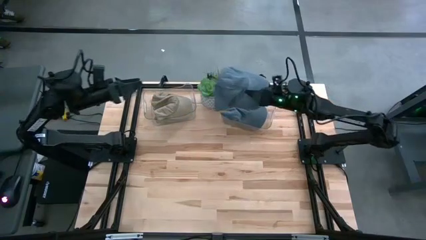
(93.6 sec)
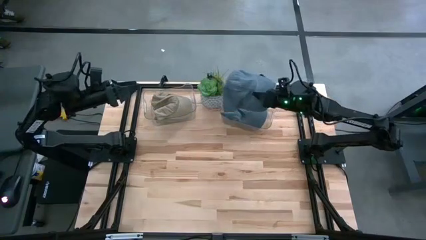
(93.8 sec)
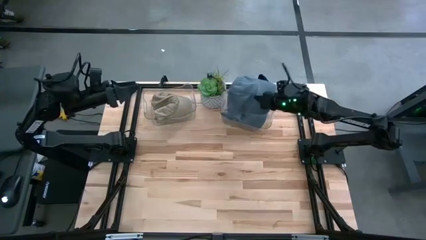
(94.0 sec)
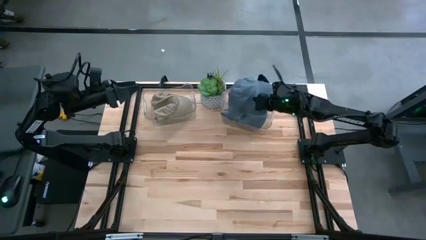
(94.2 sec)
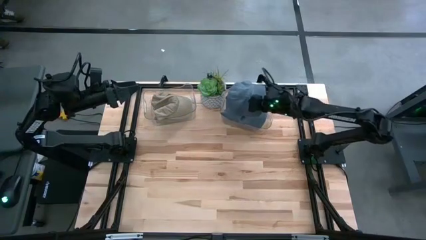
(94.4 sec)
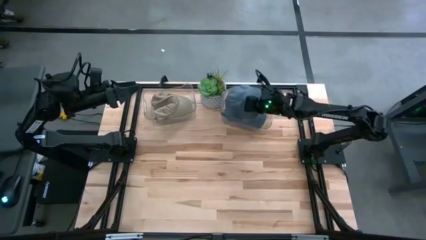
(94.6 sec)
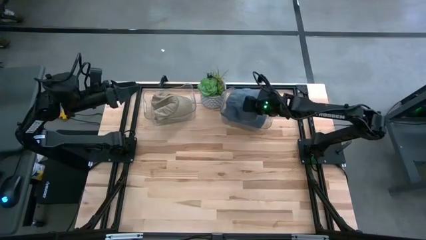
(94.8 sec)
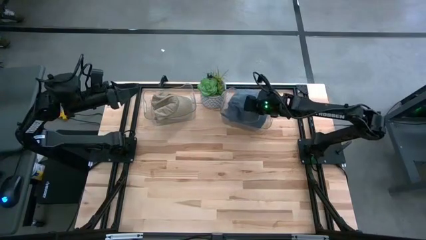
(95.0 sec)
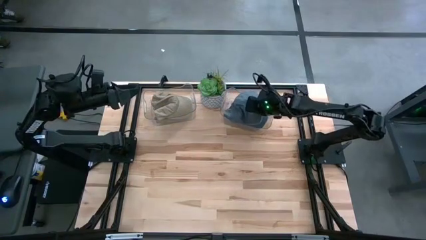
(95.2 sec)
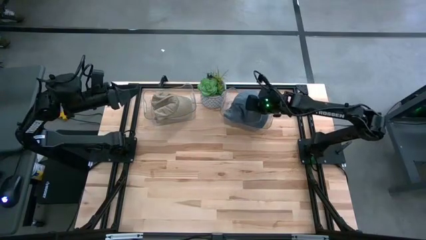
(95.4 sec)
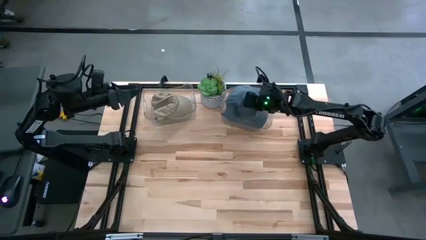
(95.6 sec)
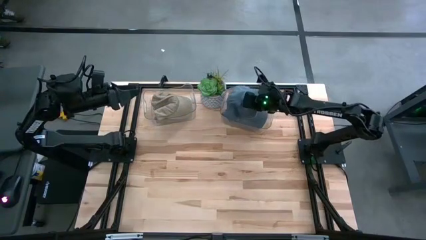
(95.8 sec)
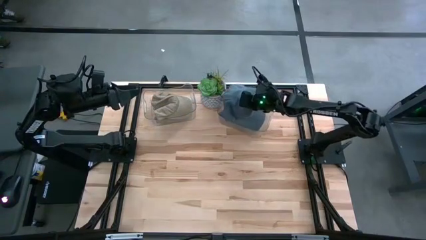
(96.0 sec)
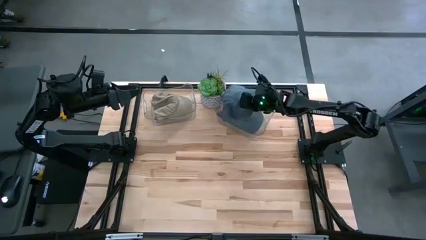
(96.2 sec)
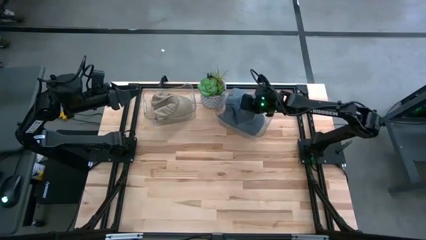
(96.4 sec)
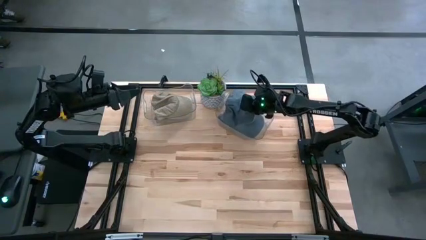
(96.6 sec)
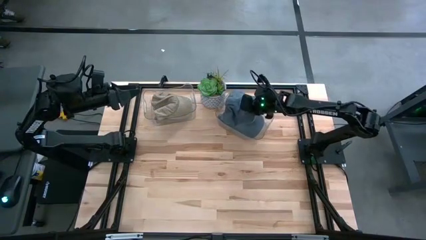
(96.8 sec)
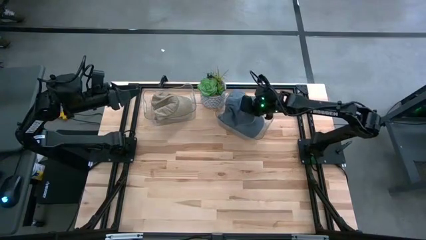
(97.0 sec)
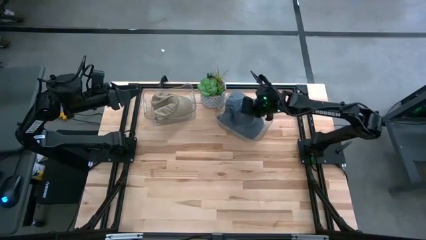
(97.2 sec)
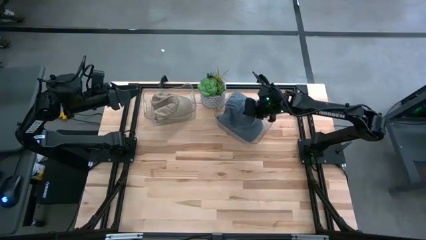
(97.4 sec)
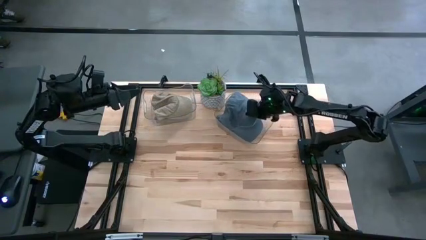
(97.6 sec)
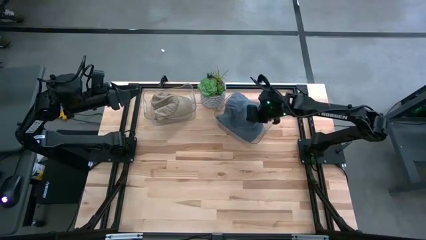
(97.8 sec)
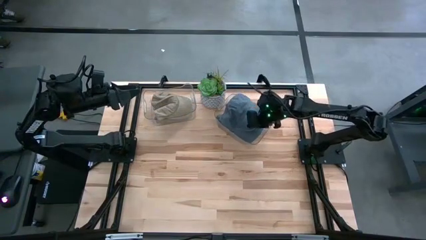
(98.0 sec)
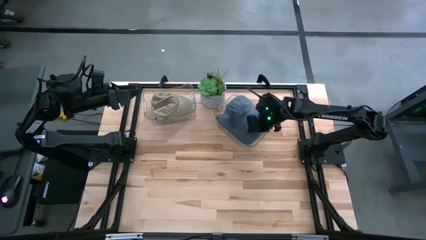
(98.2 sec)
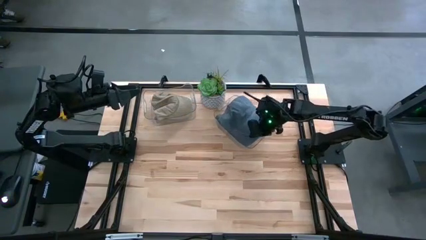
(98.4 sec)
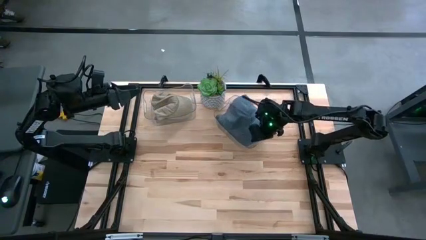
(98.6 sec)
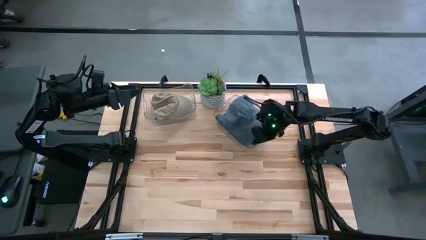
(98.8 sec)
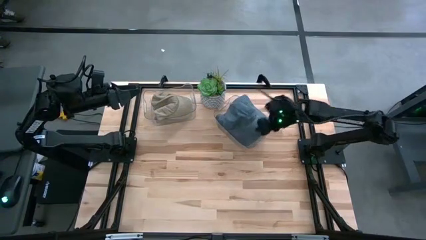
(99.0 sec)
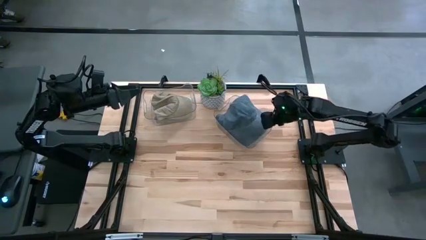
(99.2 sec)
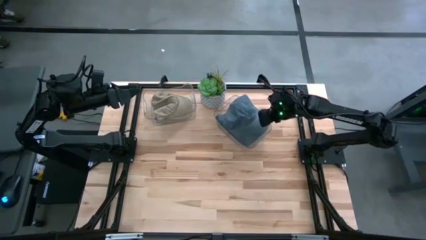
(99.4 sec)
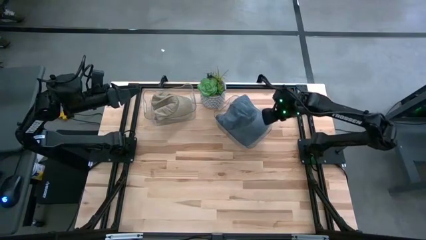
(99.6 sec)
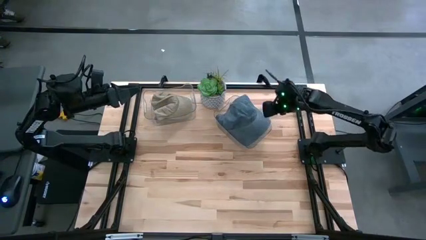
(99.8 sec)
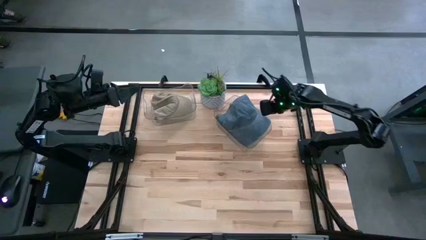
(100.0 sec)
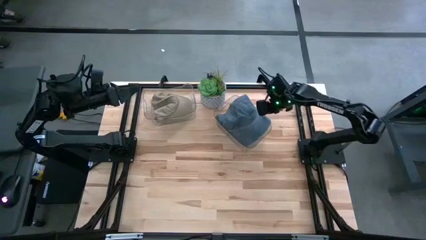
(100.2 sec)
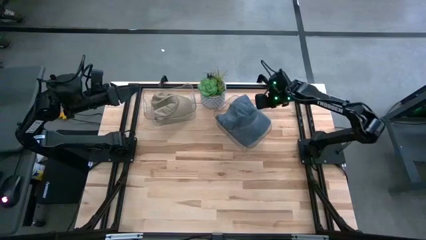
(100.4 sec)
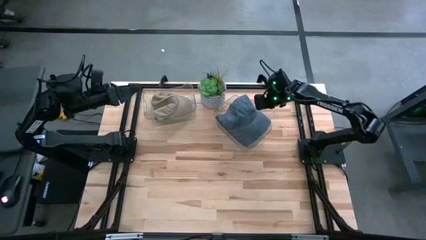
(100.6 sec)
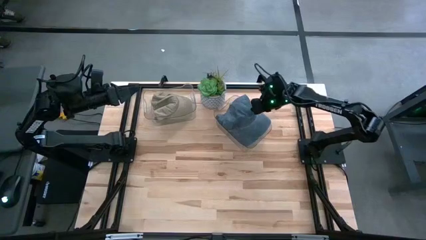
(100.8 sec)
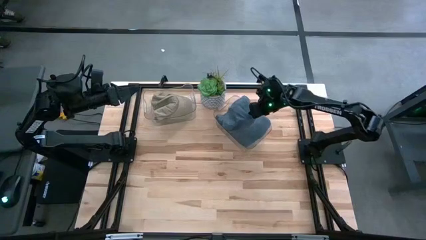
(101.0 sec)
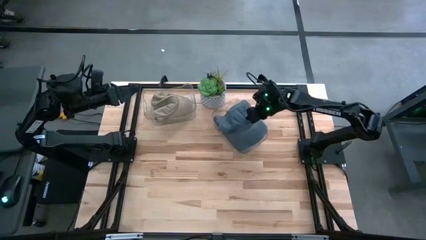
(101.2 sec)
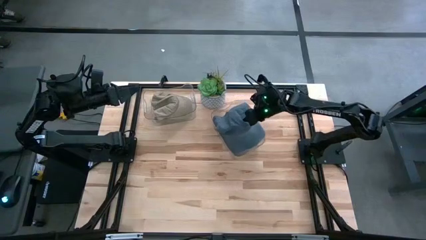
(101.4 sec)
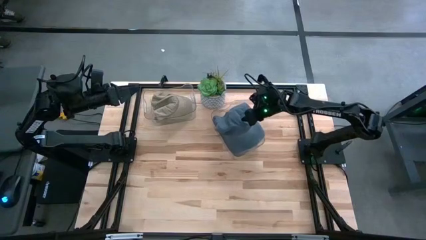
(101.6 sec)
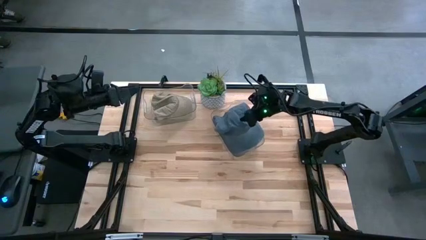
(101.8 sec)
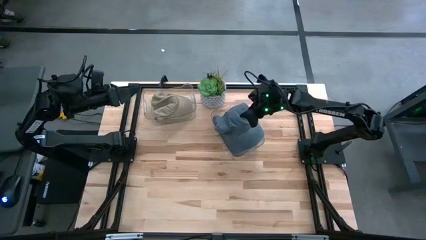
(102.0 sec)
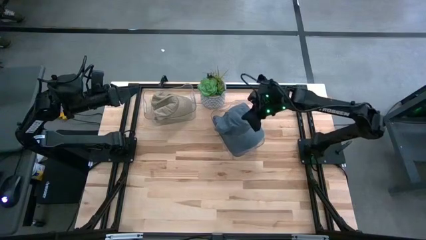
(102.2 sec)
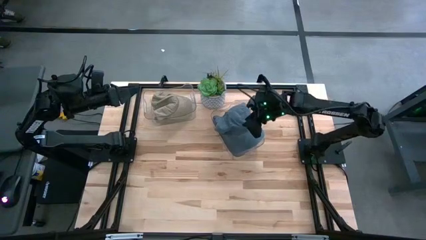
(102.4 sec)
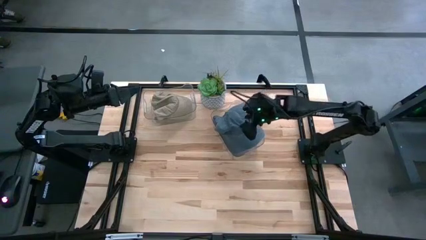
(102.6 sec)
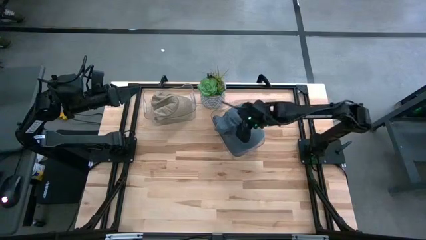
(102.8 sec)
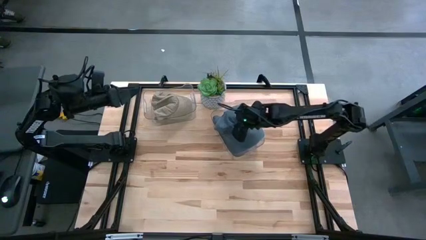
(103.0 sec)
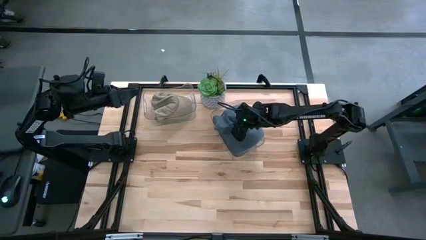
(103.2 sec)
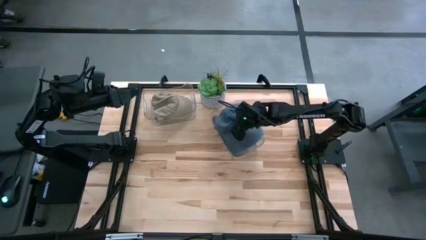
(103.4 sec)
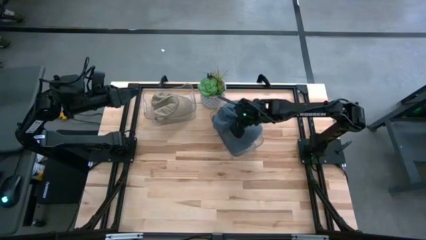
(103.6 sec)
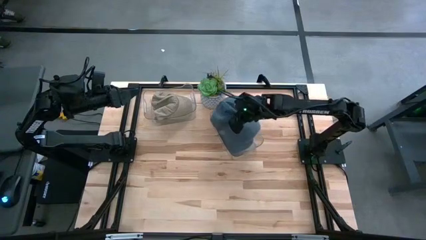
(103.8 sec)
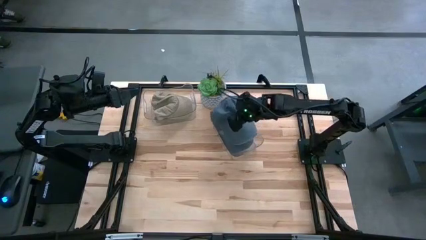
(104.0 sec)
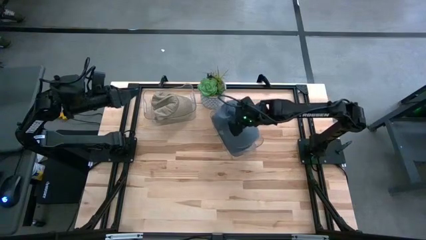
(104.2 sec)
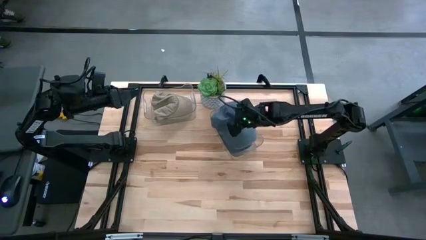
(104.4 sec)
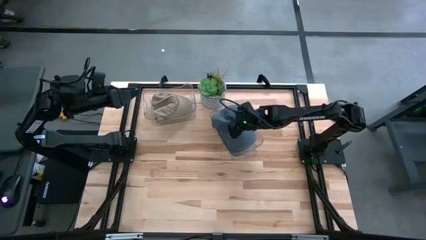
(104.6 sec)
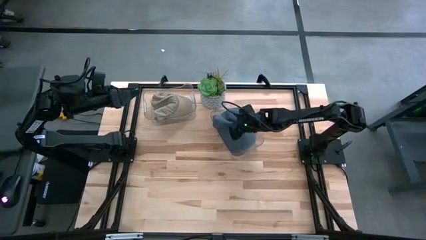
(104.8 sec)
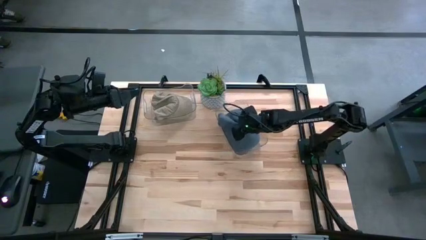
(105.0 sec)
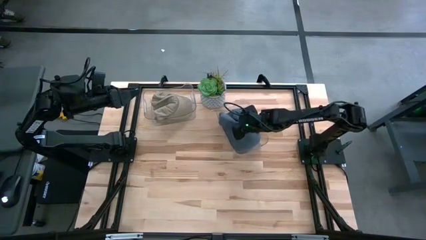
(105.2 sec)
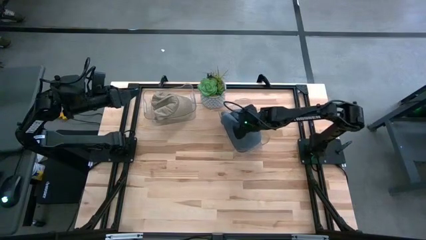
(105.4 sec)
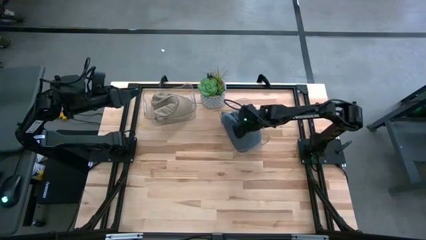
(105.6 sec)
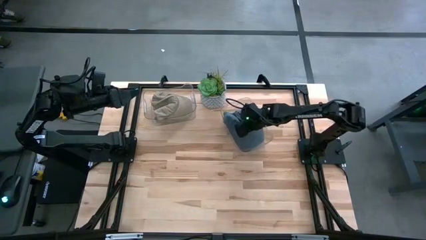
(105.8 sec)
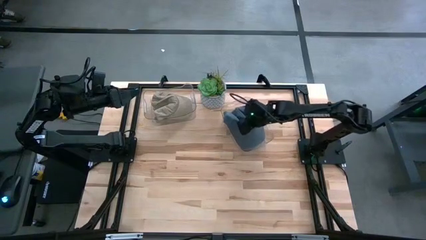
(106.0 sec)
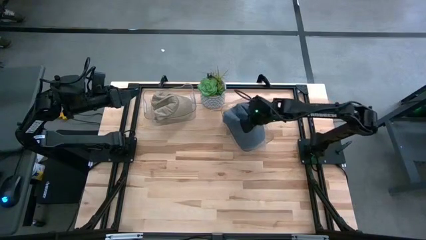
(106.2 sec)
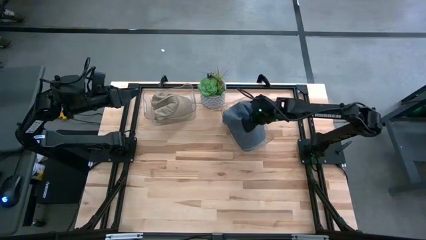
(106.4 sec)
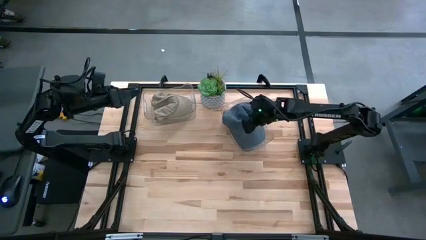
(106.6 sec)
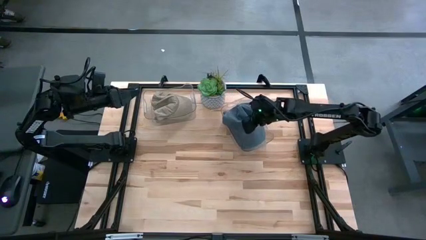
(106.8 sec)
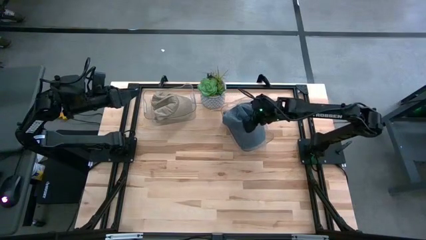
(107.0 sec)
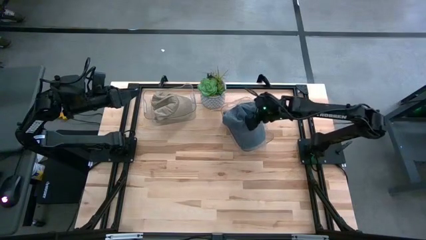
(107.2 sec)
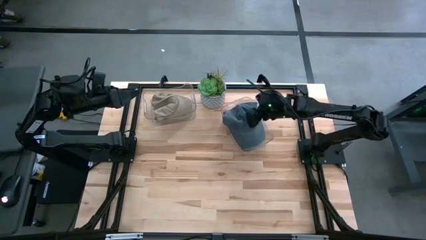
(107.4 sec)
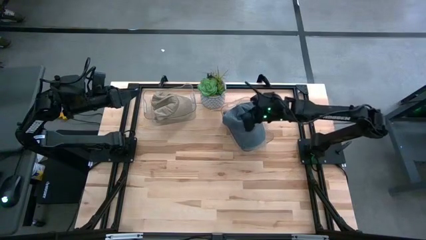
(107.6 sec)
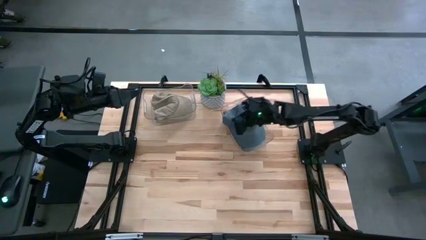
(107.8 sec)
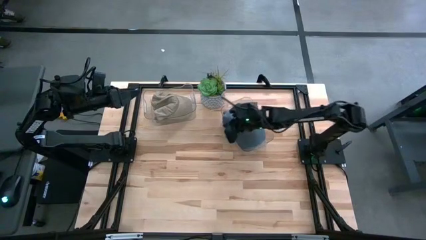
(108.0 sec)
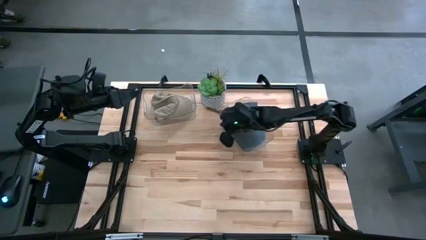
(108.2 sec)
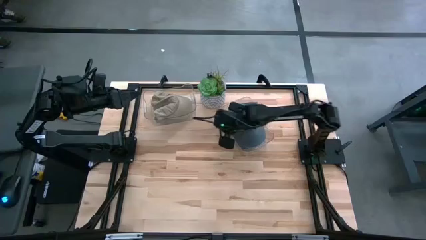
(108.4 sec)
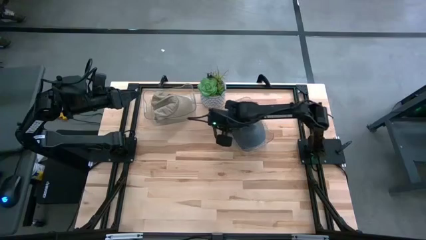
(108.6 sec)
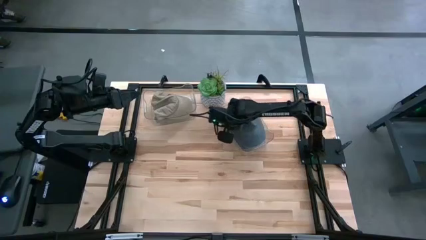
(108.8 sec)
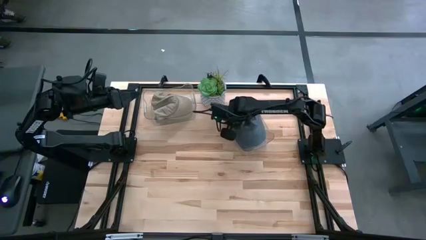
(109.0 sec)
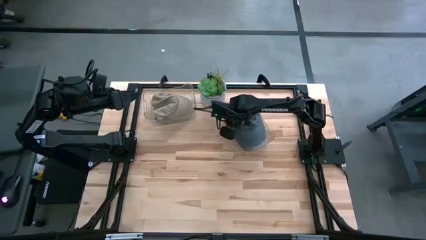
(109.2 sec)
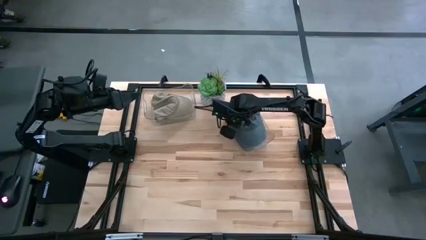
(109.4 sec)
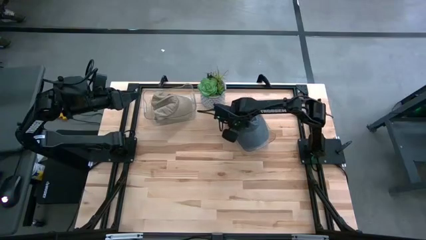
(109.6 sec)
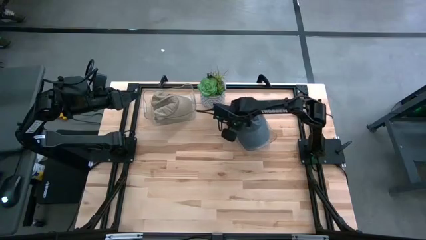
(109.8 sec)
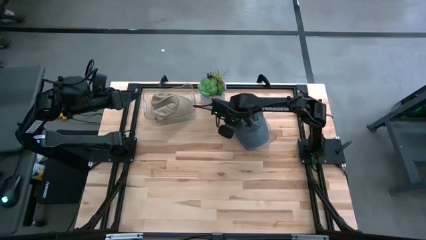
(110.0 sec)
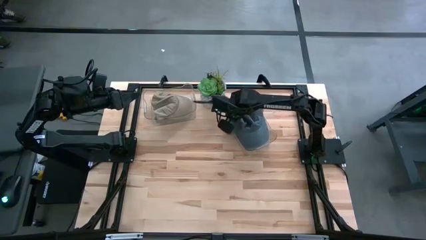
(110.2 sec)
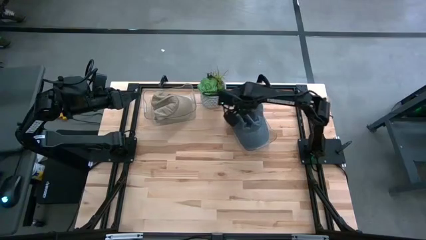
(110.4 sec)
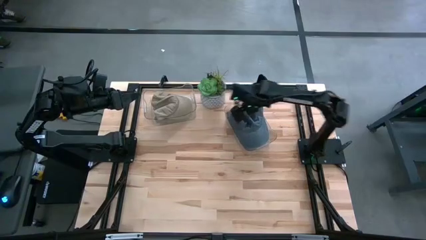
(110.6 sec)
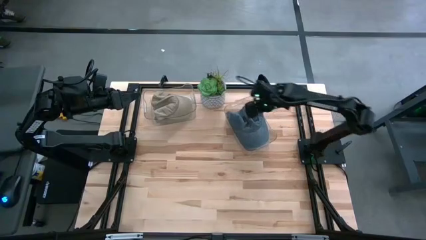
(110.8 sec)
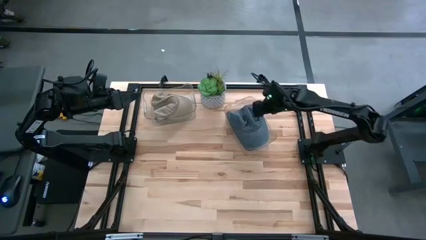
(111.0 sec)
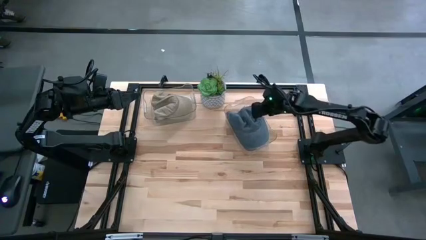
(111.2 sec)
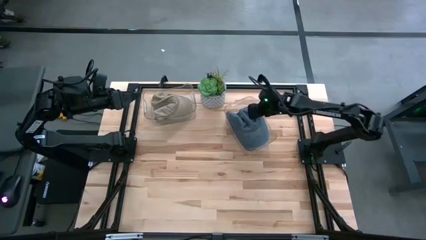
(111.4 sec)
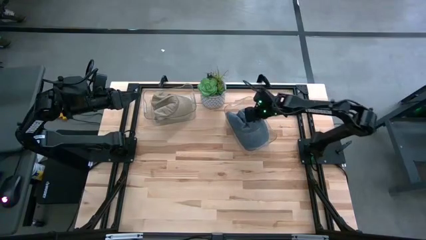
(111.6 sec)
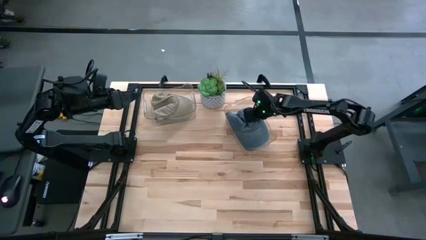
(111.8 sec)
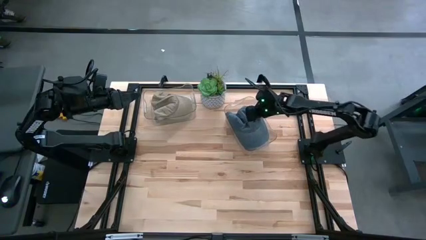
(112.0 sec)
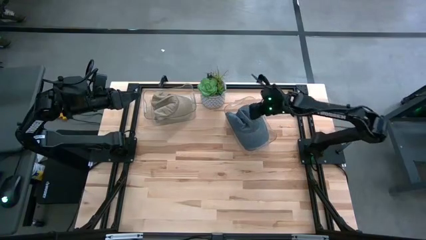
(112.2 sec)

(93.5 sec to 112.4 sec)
Task: Pick & Place hat
Put the blue cap into the right transparent bin
